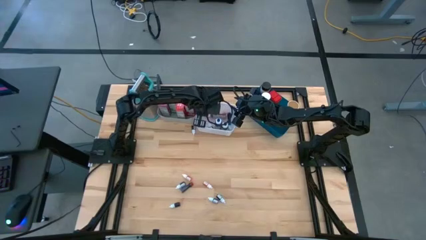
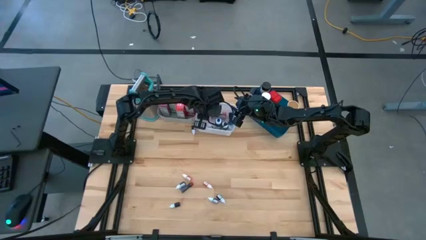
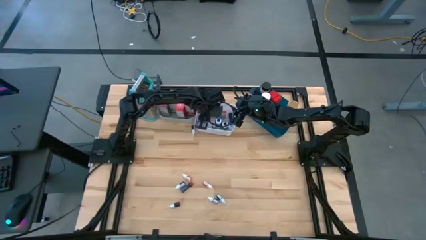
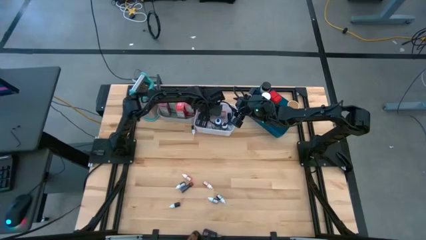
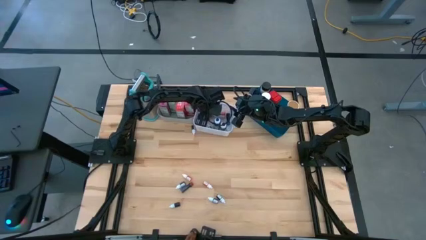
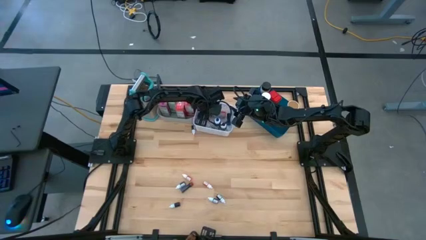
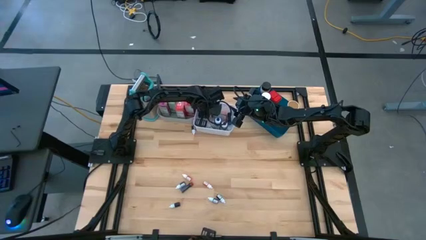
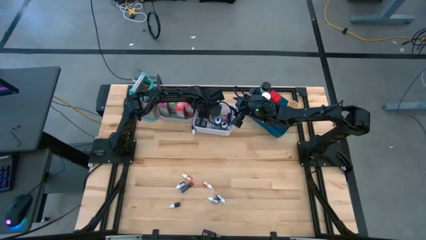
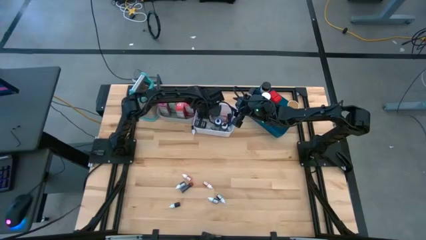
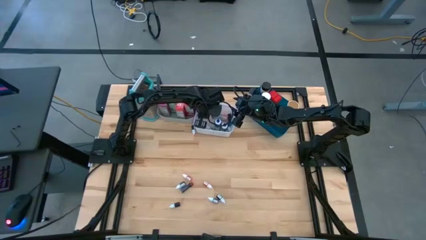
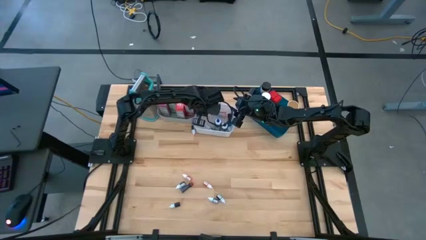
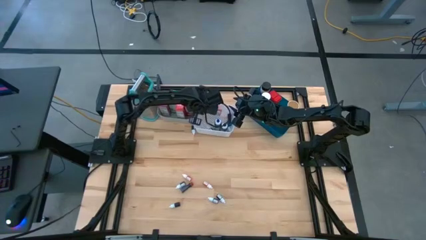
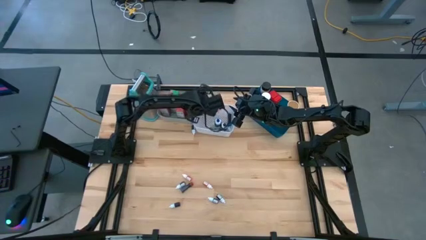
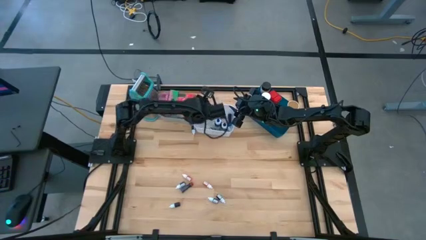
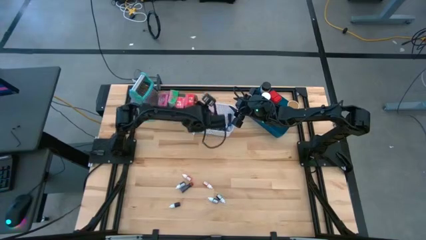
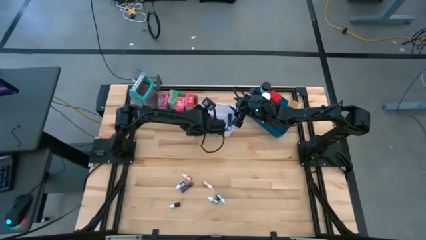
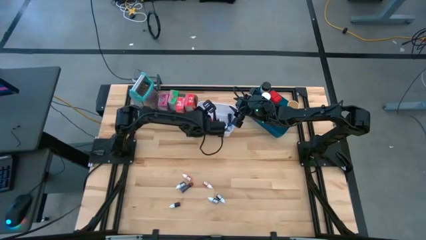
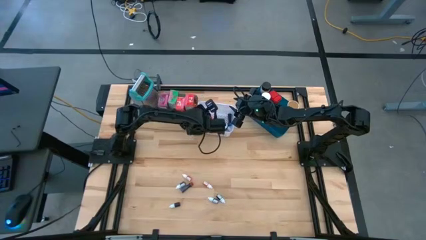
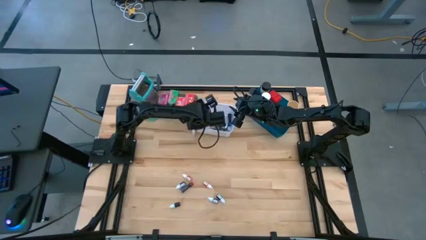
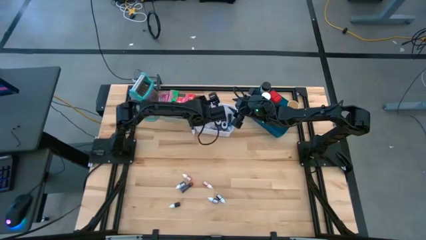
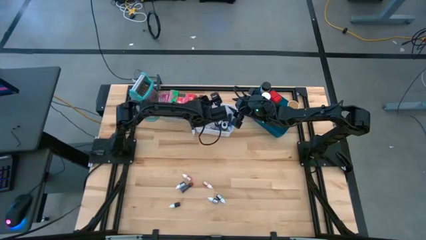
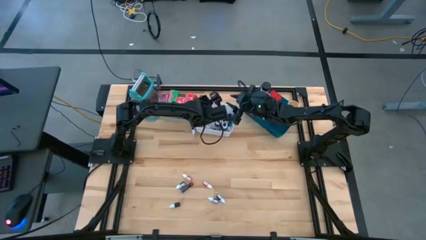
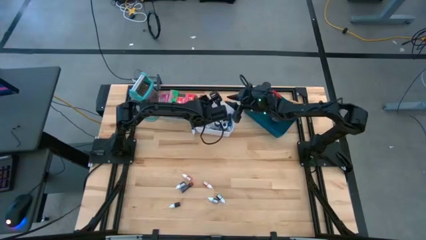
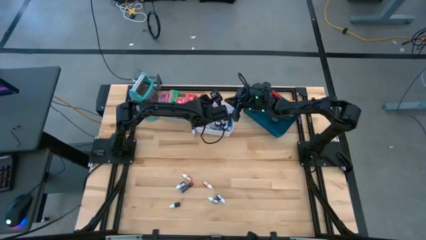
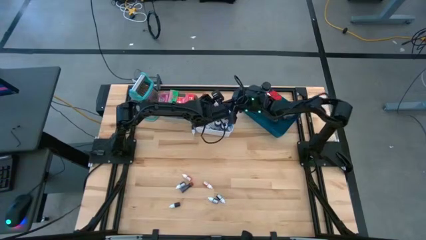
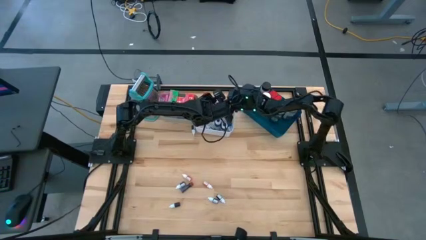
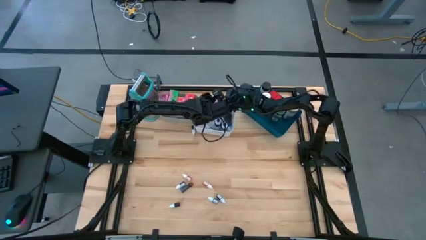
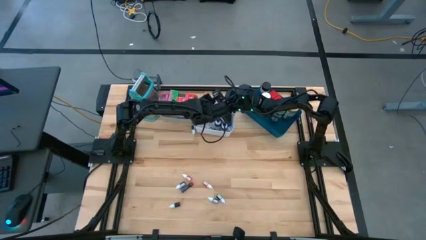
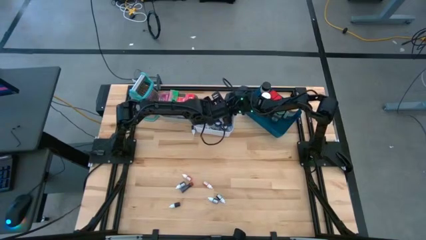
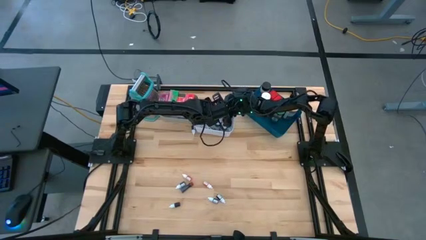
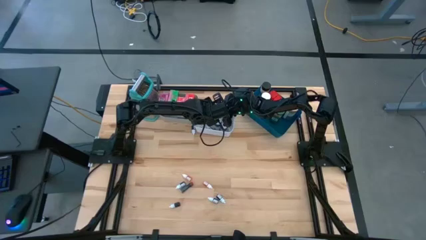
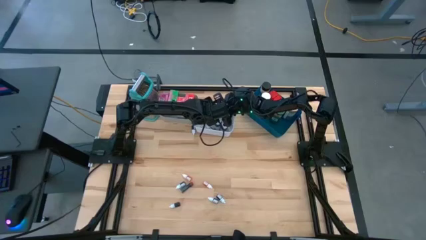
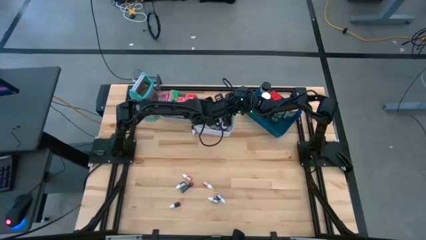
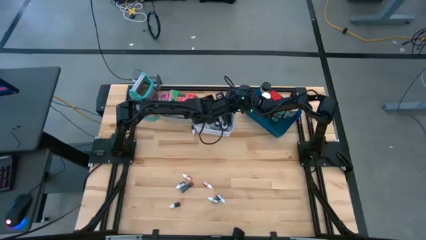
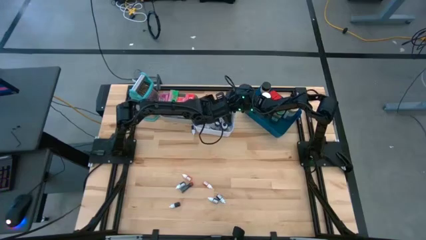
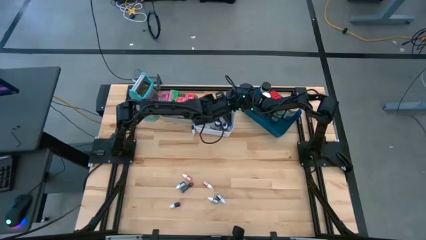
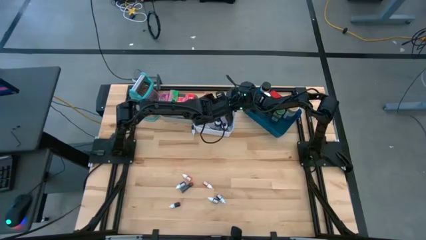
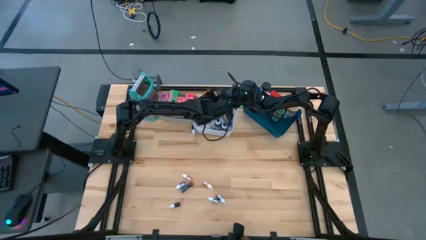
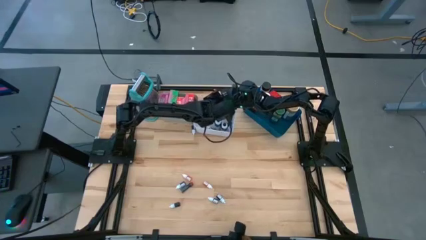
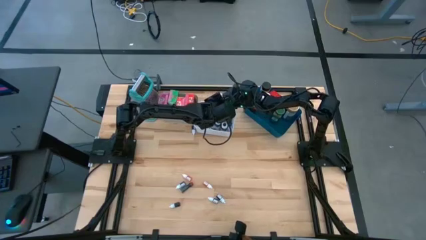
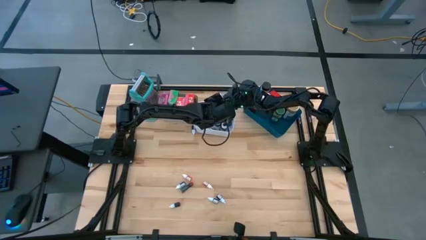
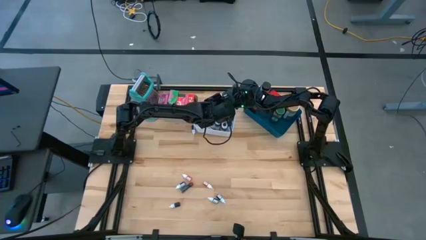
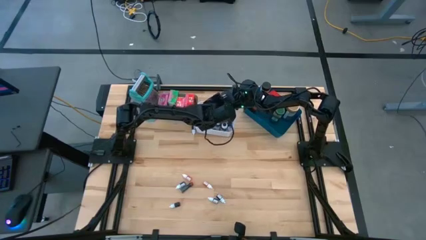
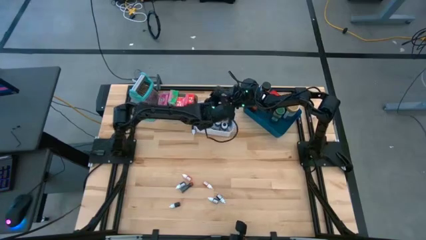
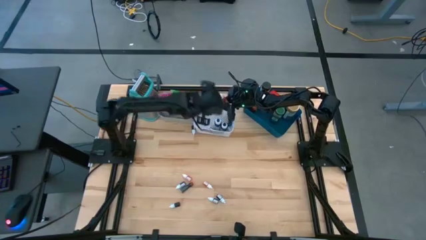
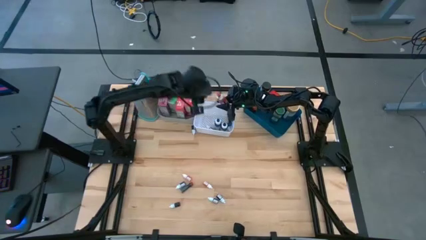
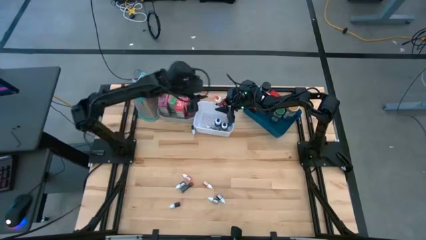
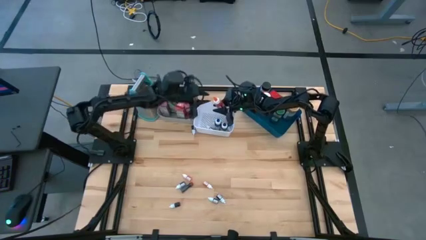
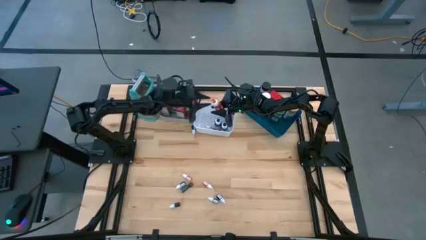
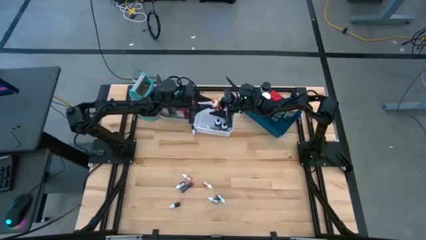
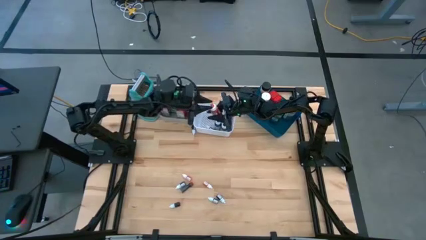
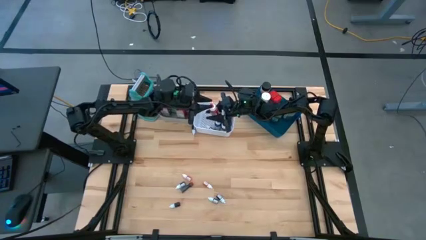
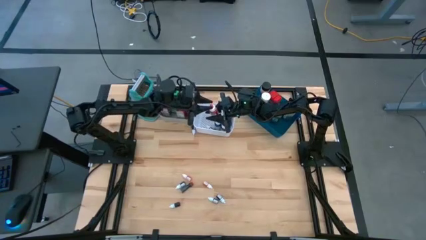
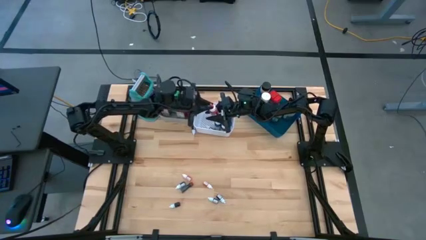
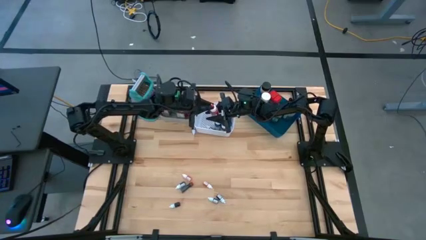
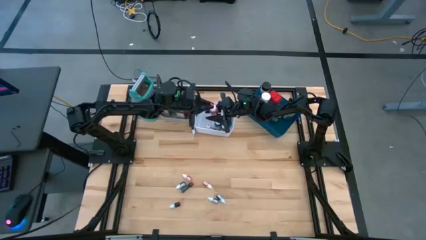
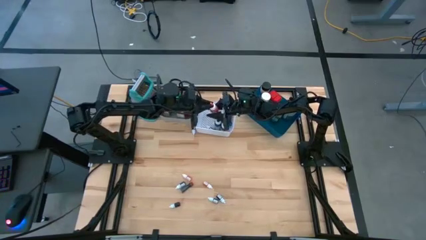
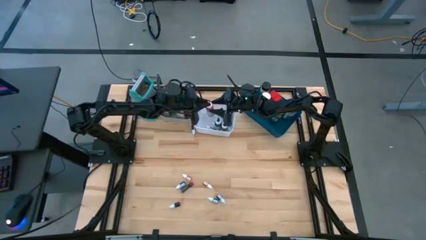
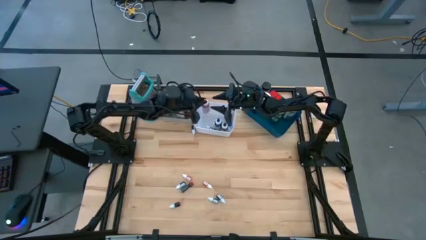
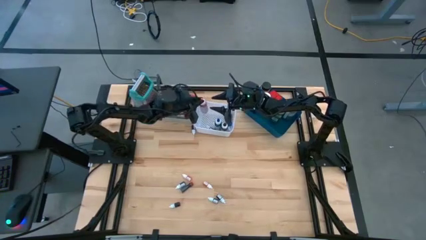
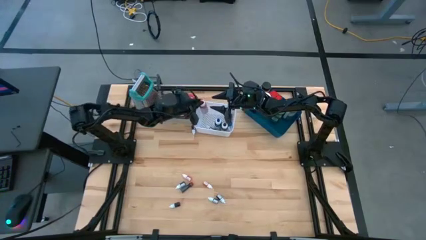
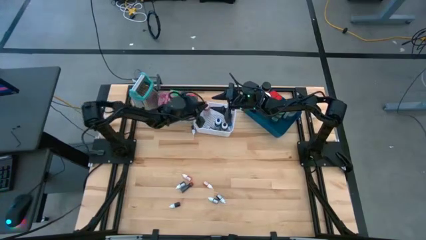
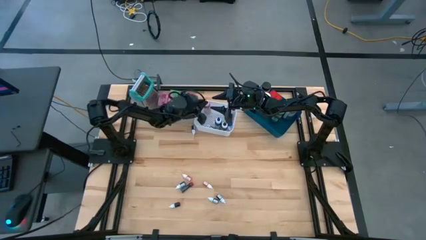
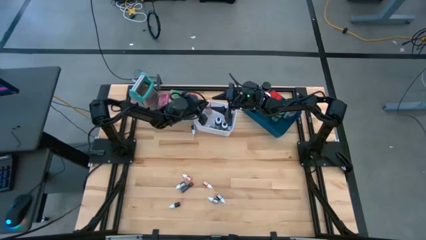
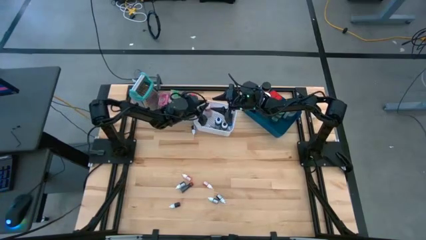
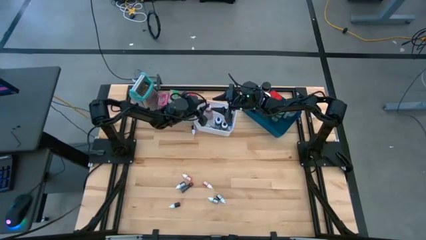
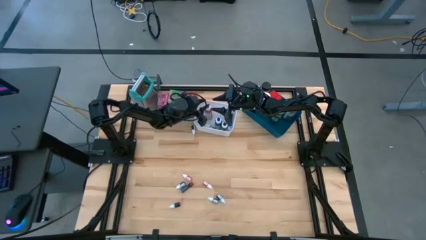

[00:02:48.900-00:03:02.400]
Task: Pick & Place Kitchen Items
Adjust the large orange food coloring bottle into the white bin

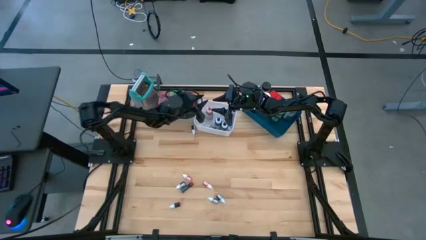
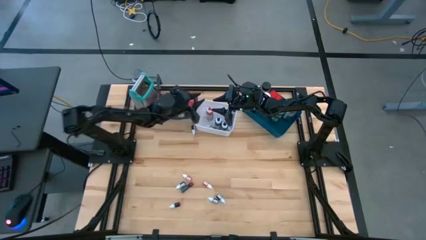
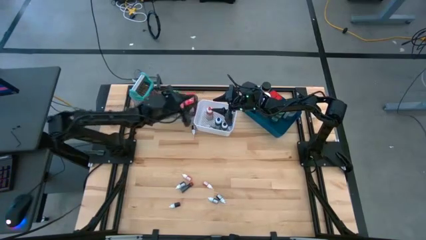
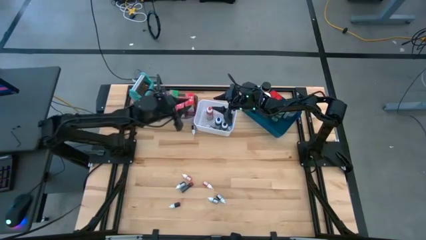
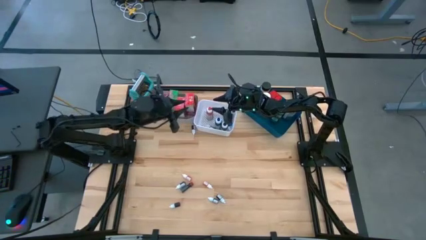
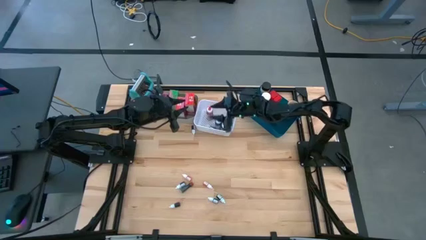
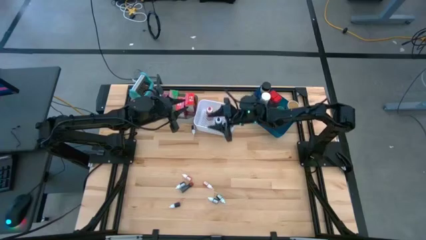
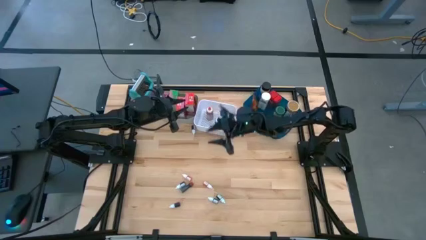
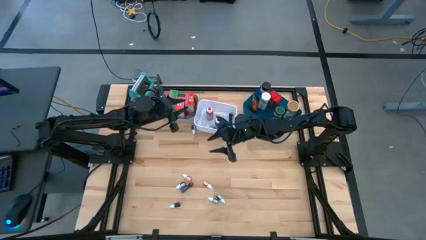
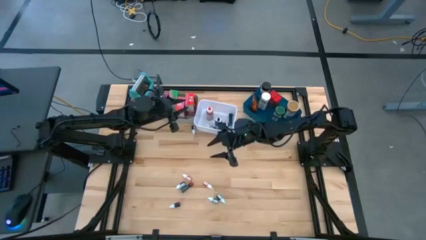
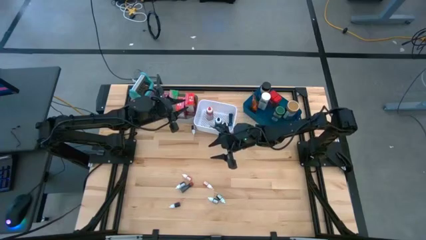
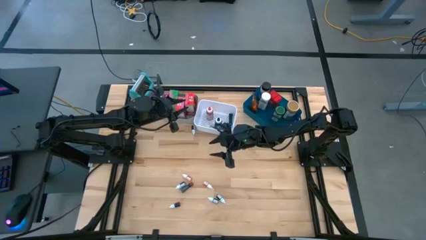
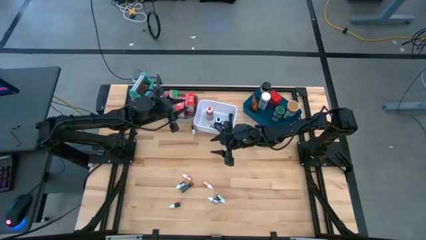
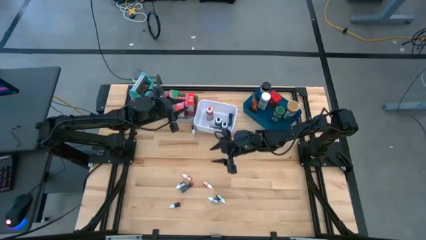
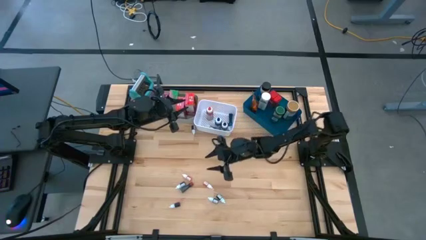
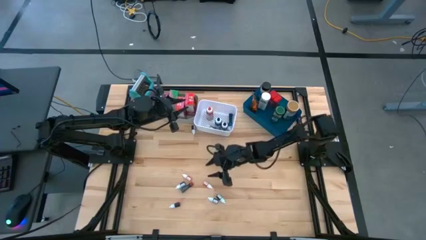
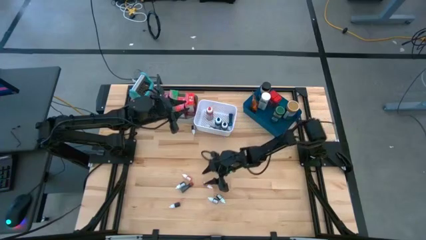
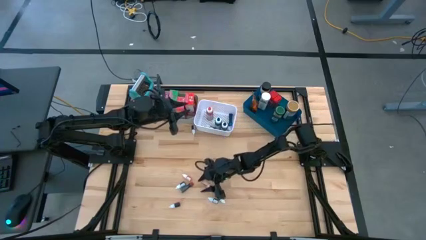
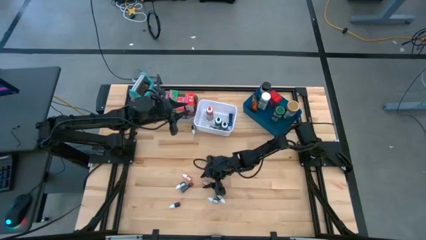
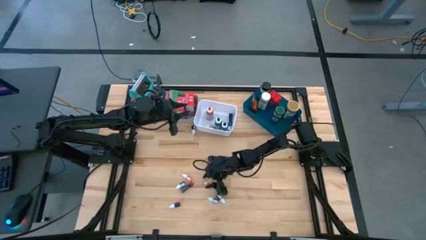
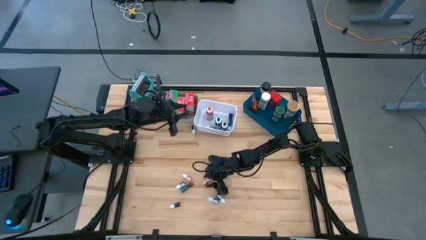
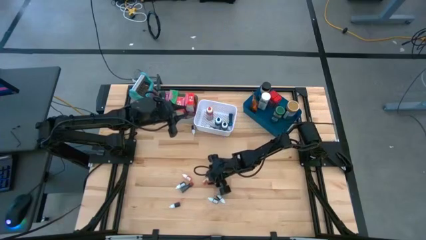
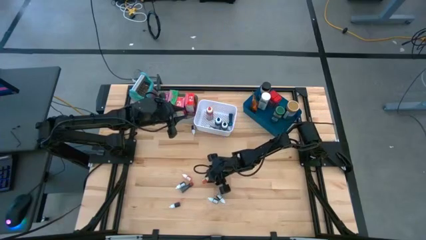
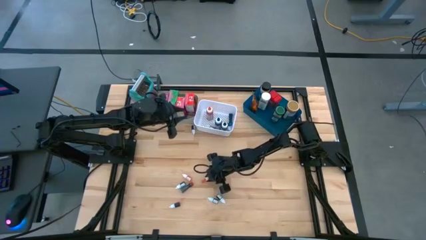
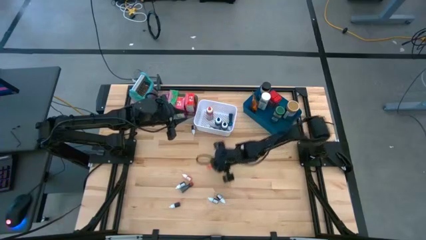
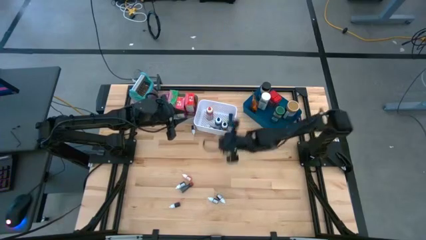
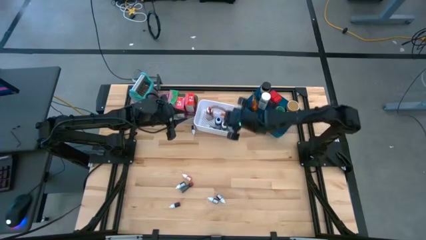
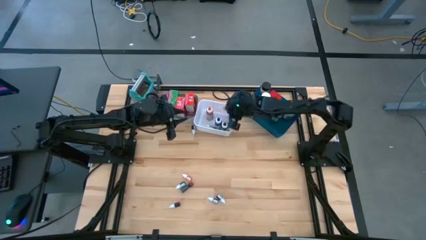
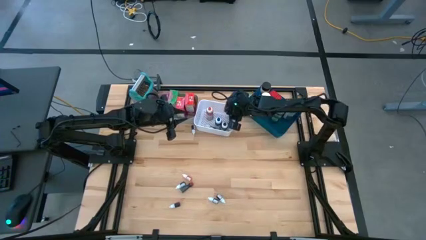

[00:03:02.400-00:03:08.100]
Put the right small orange food coloring bottle into the white bin
